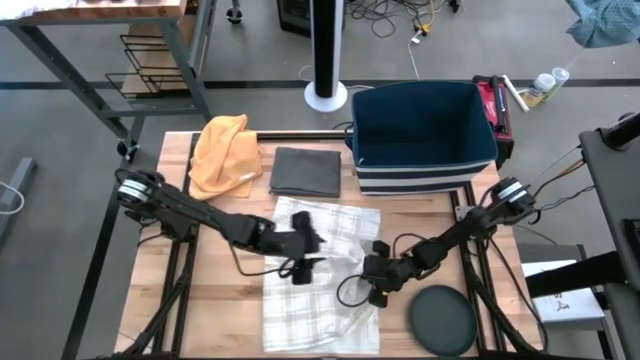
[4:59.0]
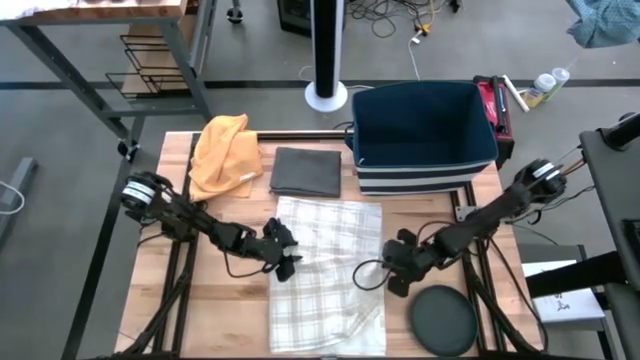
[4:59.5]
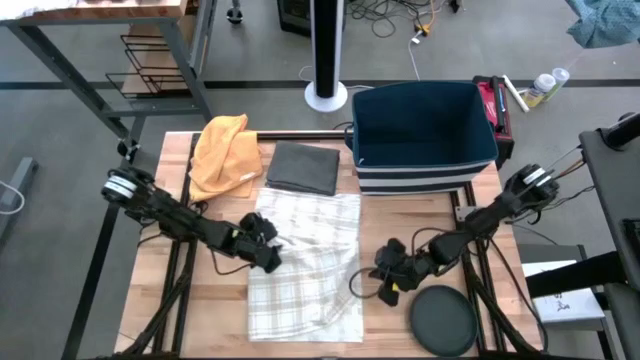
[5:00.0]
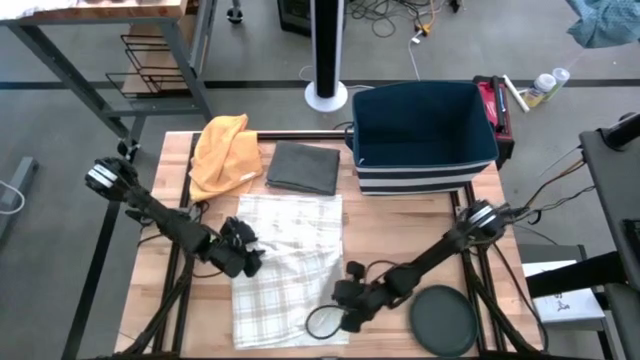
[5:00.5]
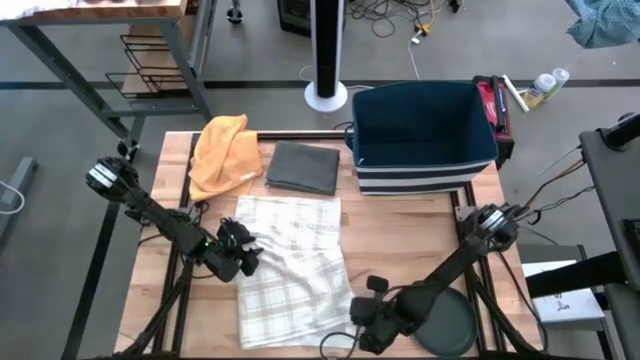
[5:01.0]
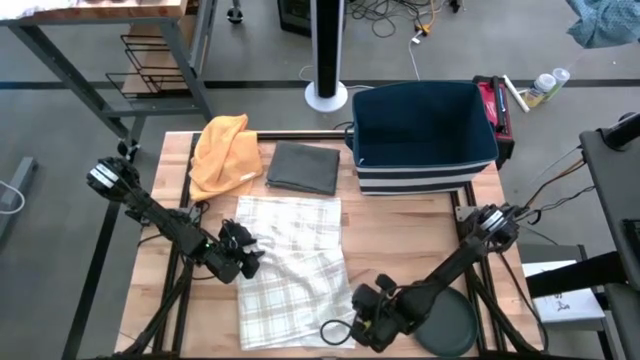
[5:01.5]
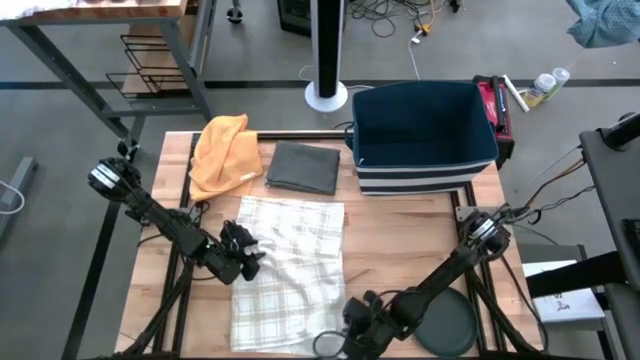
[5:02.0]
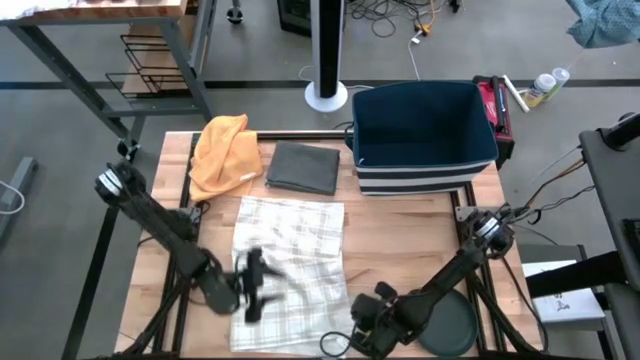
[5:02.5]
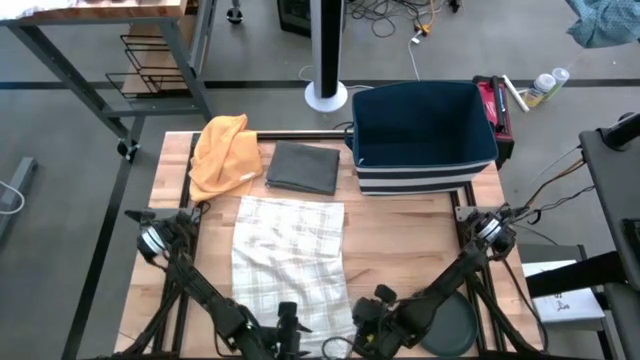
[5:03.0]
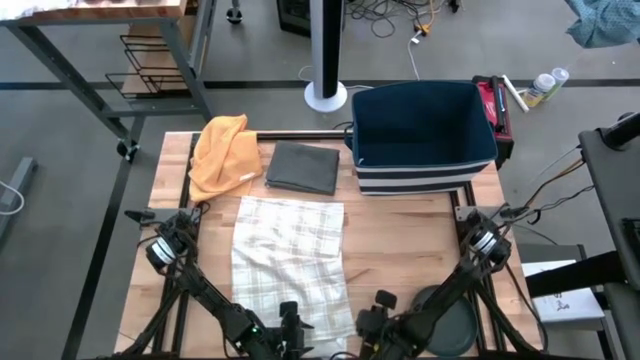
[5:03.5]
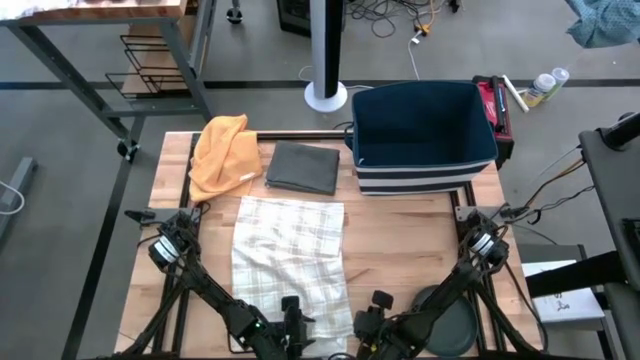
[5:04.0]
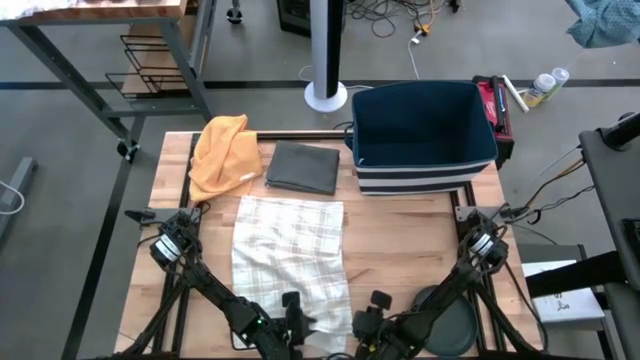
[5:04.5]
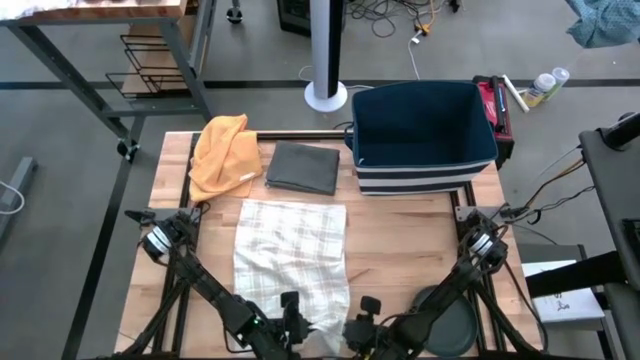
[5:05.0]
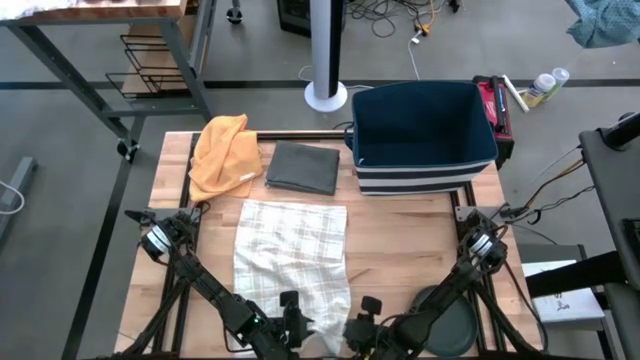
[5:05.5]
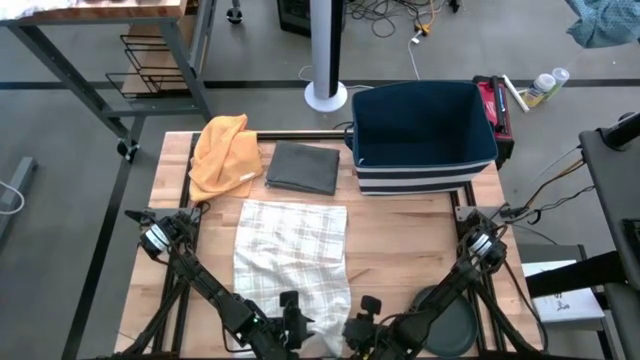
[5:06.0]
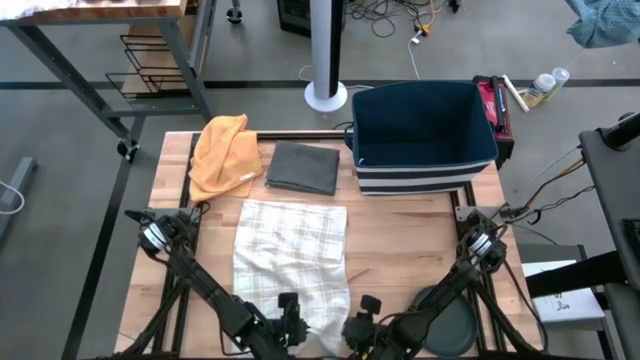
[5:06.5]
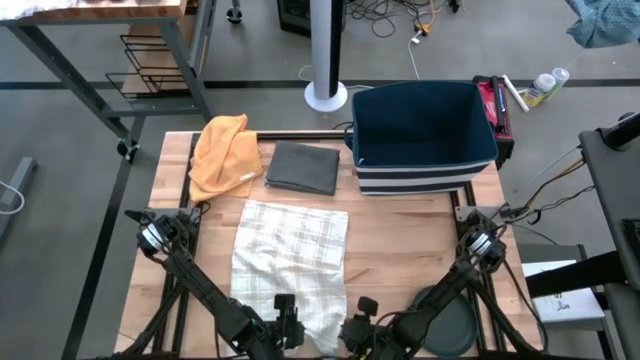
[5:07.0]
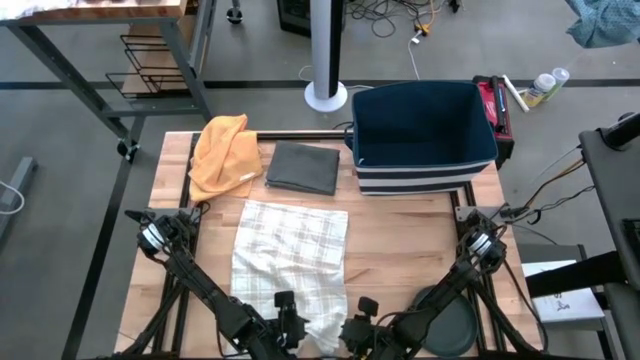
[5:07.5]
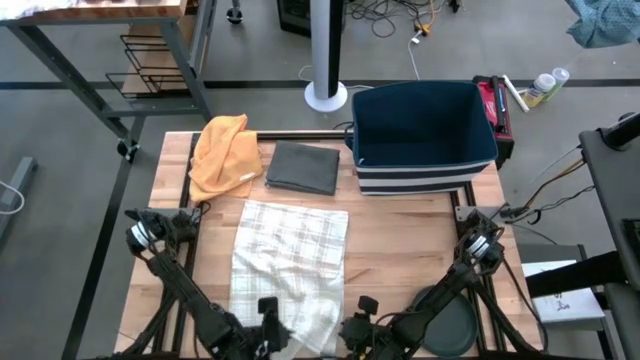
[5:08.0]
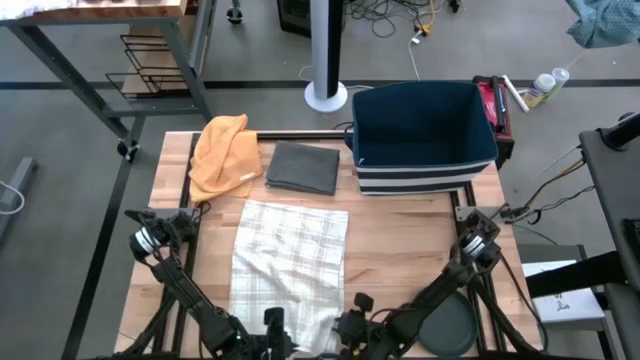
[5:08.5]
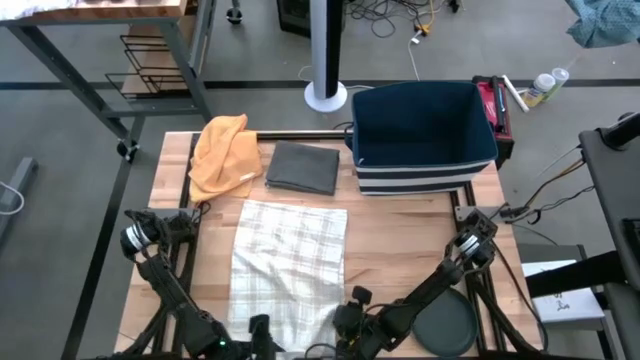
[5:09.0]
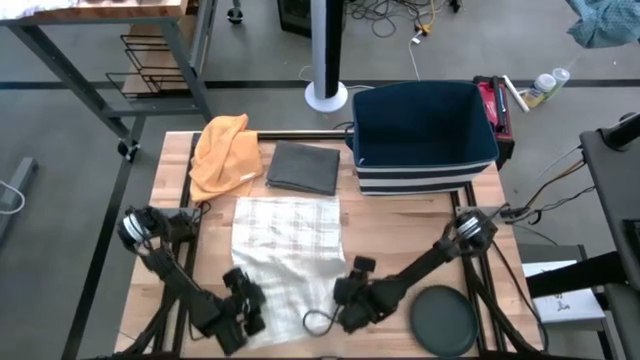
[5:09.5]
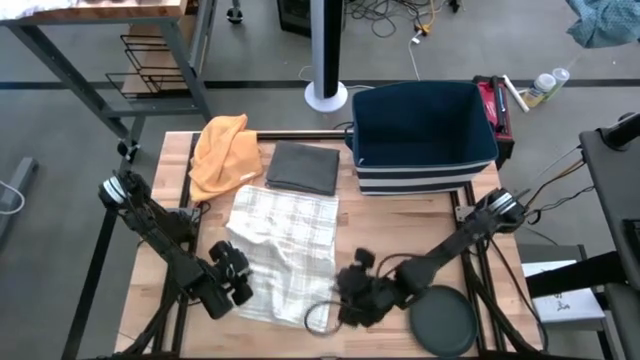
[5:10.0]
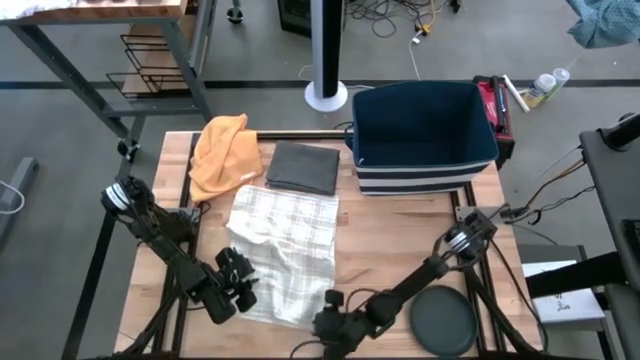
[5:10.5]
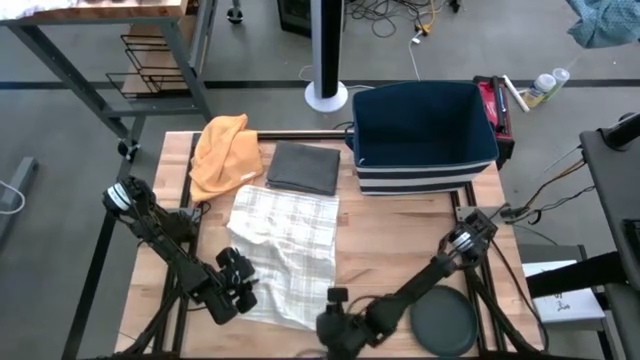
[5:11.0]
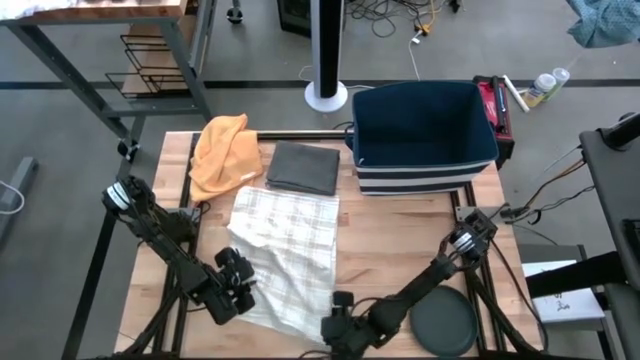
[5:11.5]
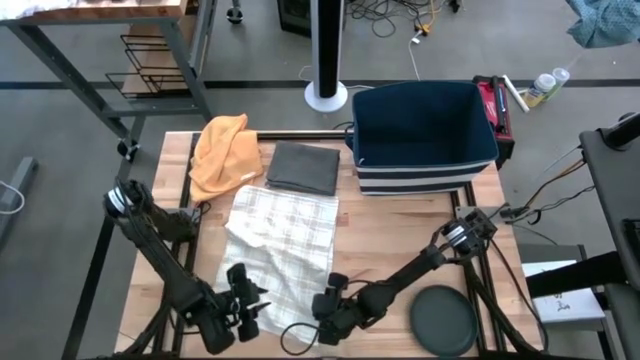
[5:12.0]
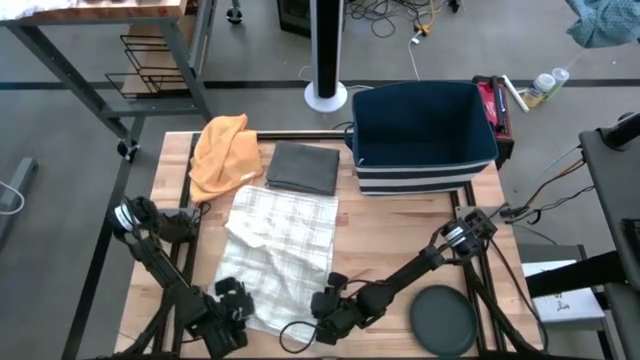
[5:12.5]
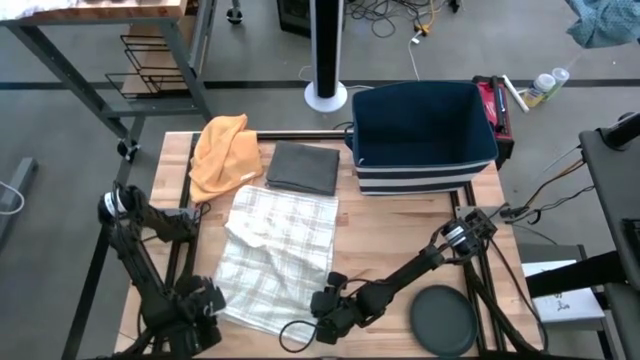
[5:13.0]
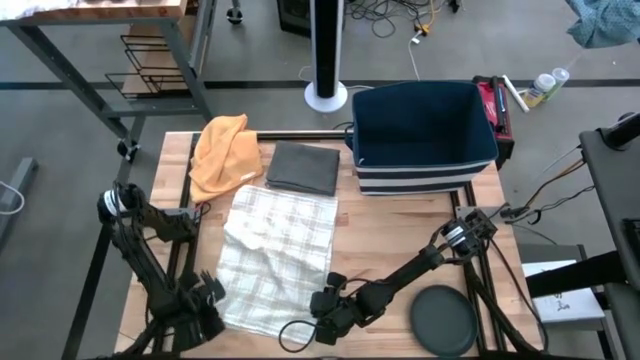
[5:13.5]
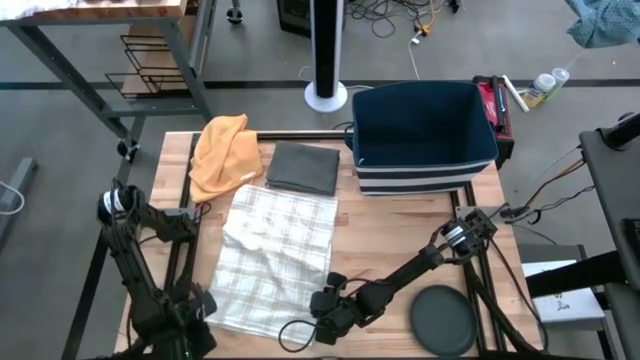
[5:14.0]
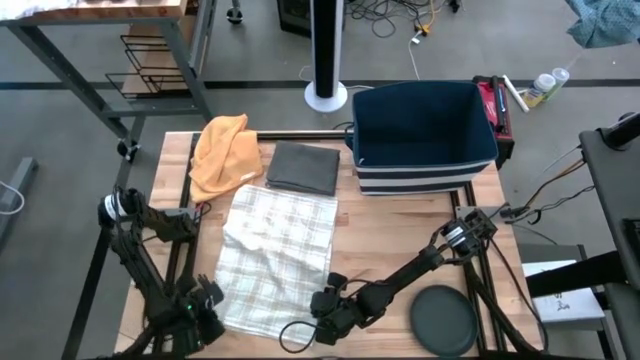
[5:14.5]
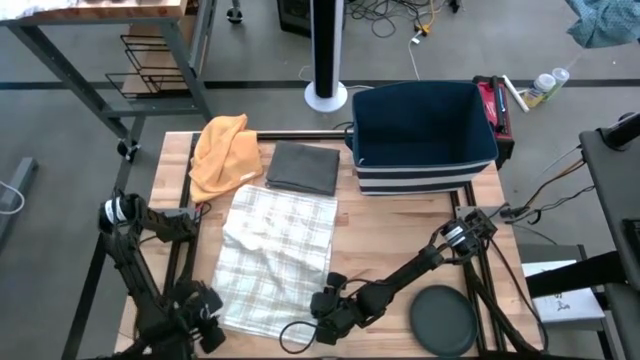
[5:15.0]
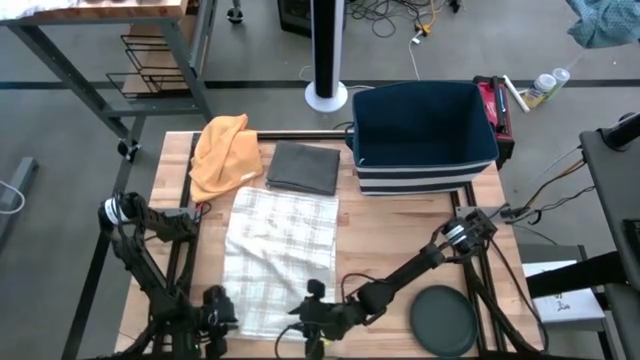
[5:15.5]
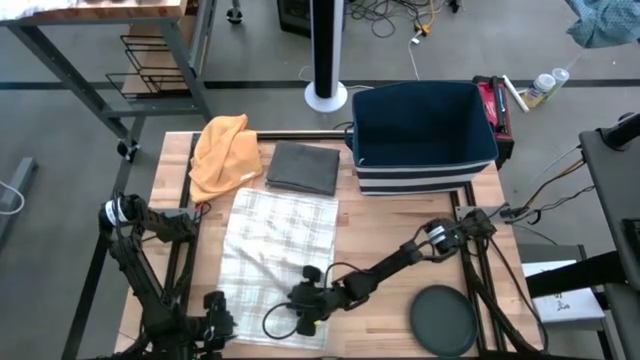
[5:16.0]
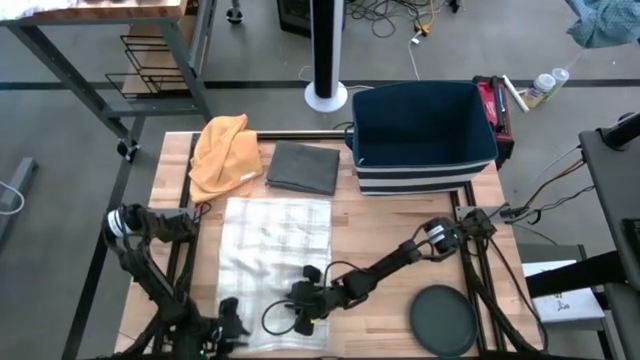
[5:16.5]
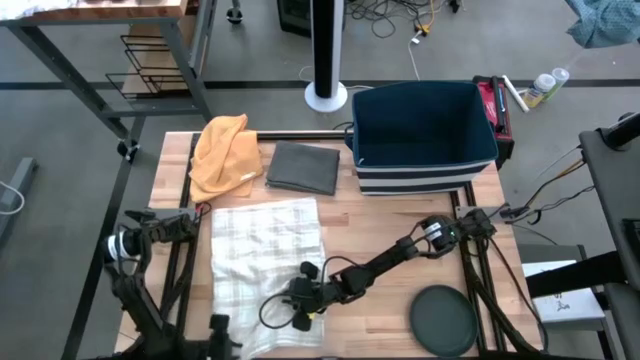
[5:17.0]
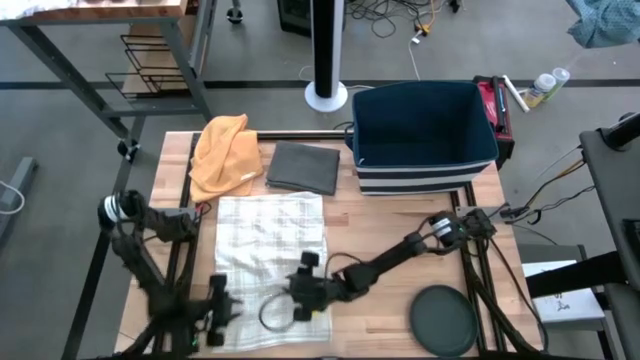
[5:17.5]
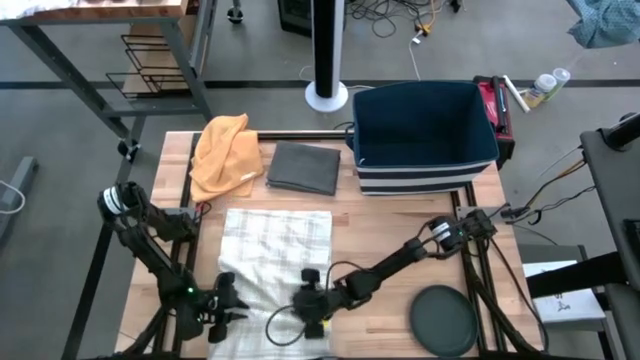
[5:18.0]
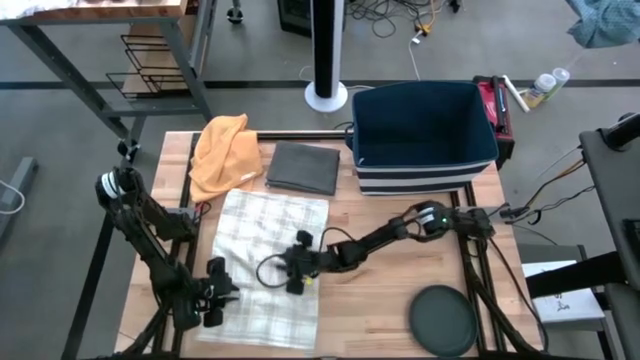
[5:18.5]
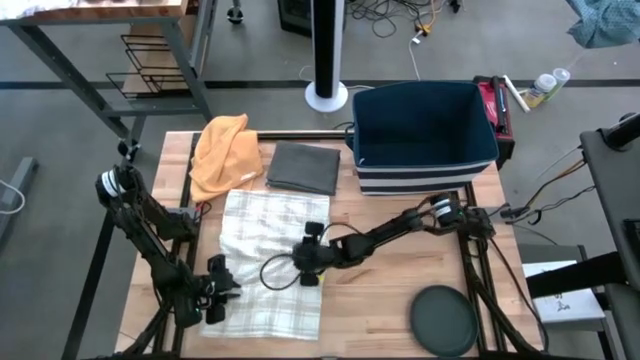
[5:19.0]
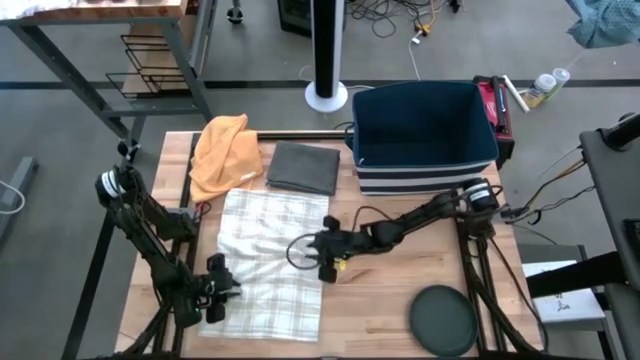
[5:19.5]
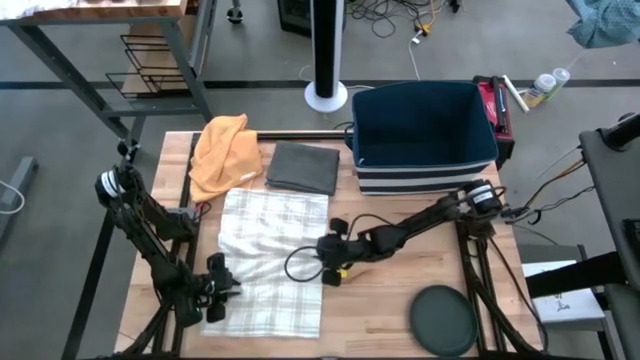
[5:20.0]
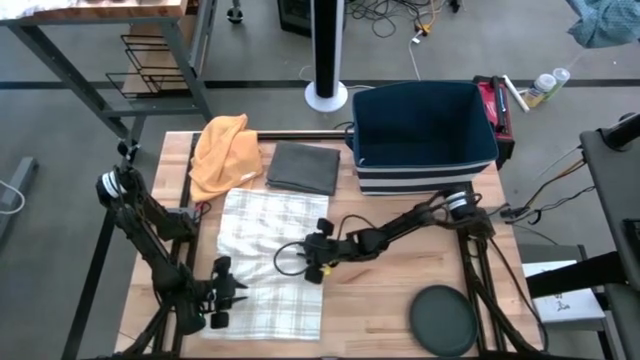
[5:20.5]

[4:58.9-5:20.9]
Task: Fold kitchen towel into neat rectangle
Fold the white patterned towel
